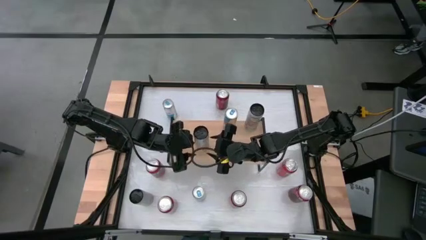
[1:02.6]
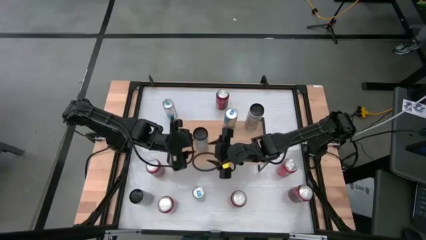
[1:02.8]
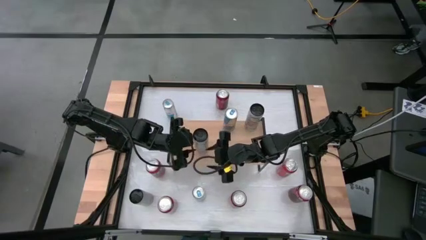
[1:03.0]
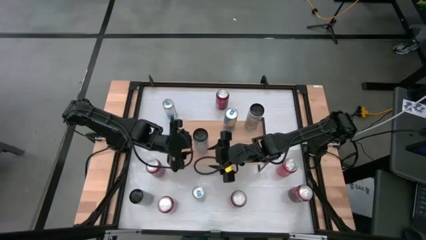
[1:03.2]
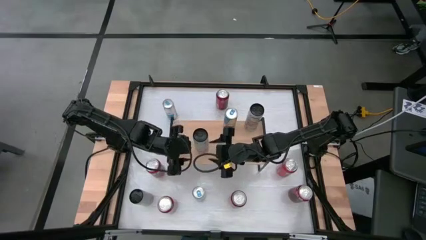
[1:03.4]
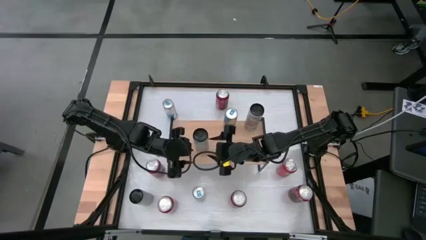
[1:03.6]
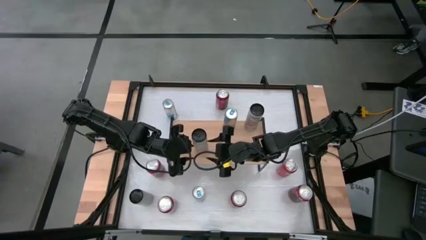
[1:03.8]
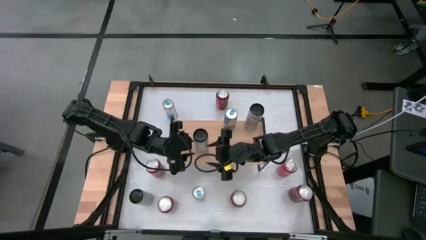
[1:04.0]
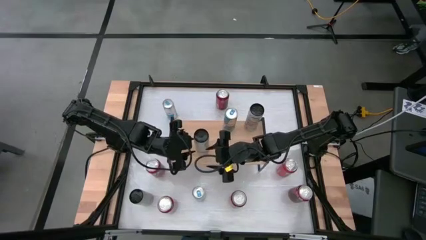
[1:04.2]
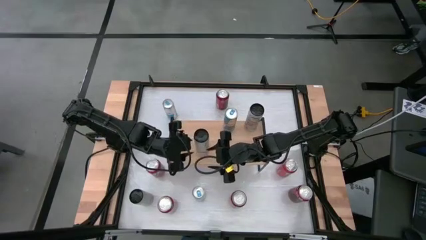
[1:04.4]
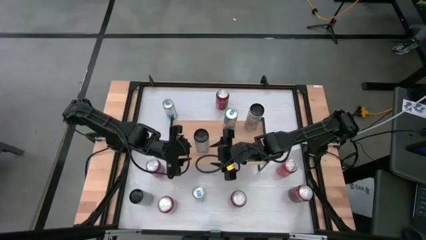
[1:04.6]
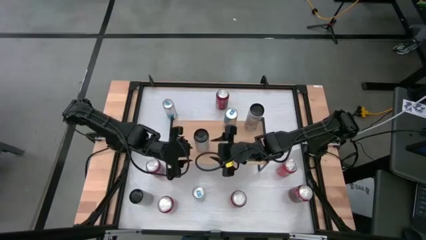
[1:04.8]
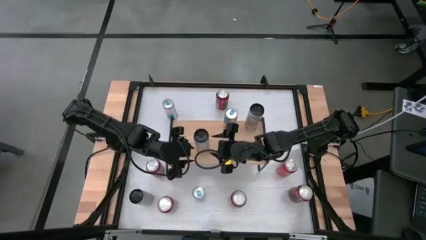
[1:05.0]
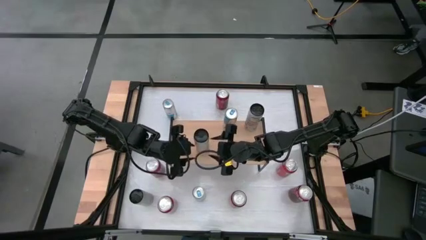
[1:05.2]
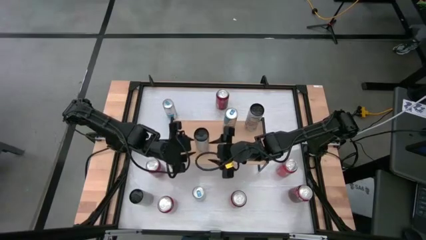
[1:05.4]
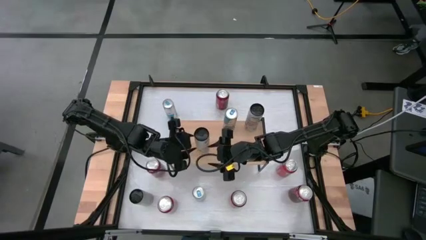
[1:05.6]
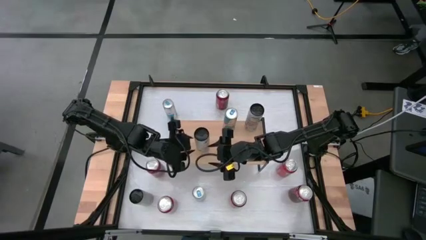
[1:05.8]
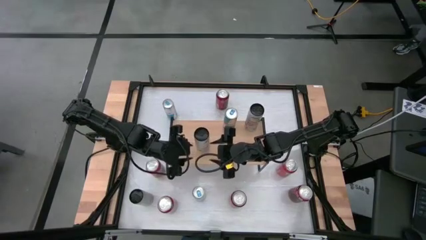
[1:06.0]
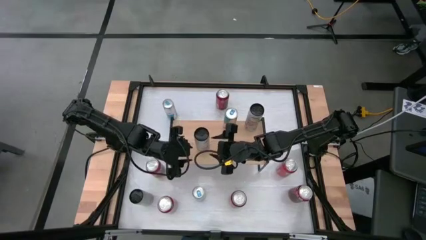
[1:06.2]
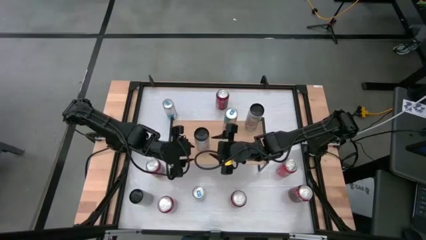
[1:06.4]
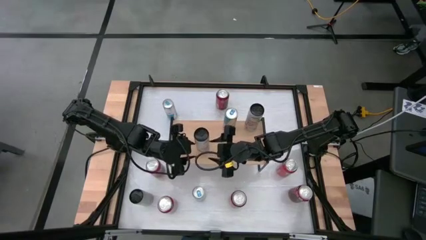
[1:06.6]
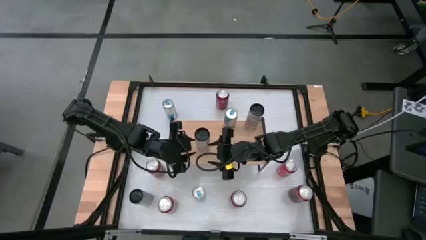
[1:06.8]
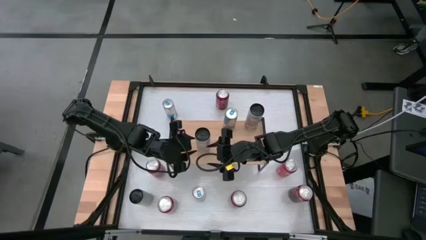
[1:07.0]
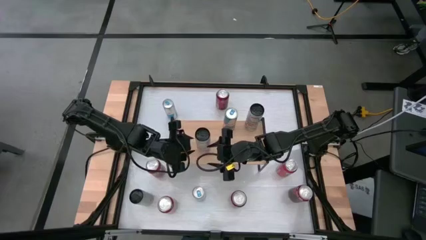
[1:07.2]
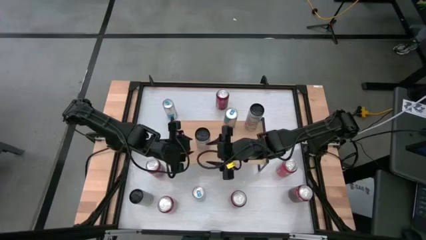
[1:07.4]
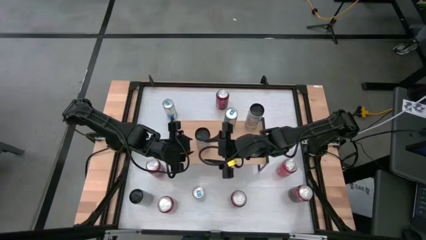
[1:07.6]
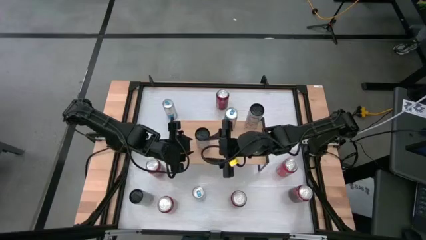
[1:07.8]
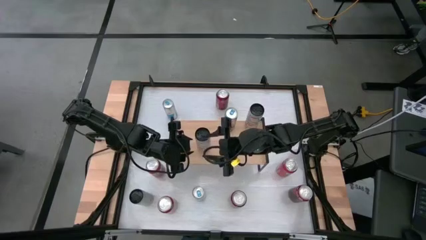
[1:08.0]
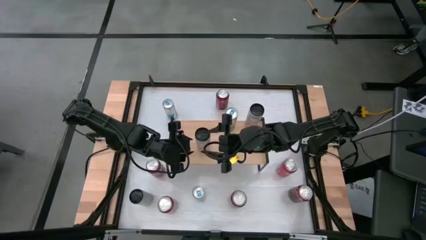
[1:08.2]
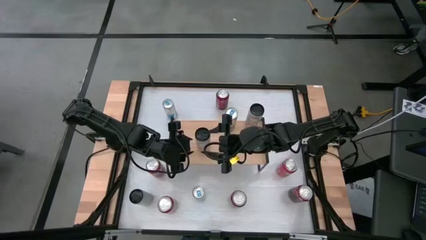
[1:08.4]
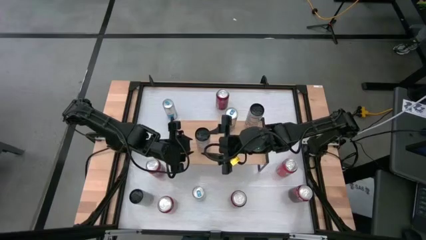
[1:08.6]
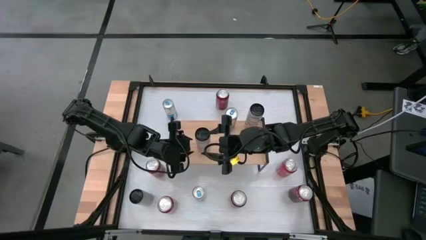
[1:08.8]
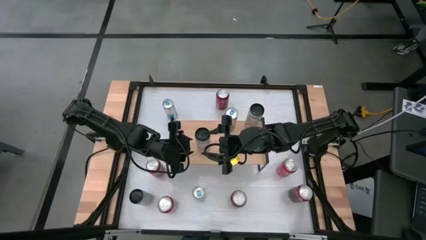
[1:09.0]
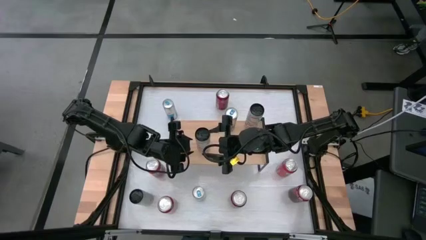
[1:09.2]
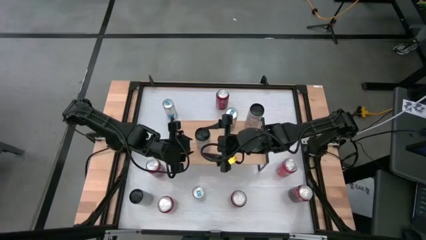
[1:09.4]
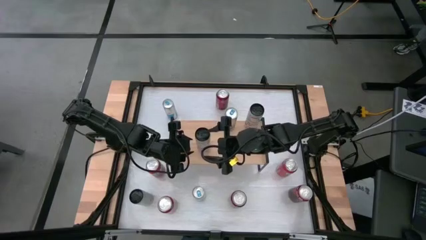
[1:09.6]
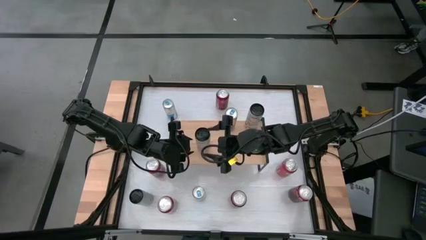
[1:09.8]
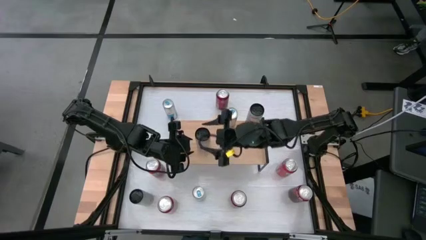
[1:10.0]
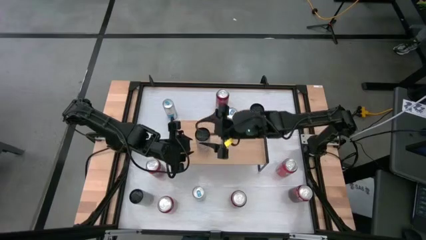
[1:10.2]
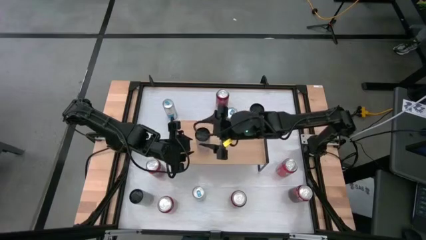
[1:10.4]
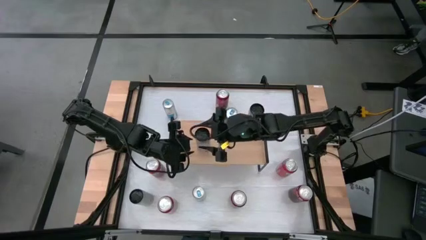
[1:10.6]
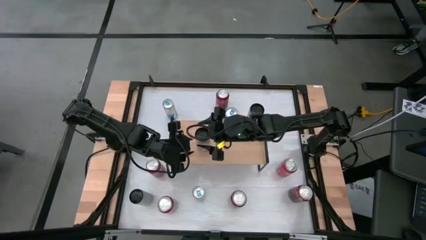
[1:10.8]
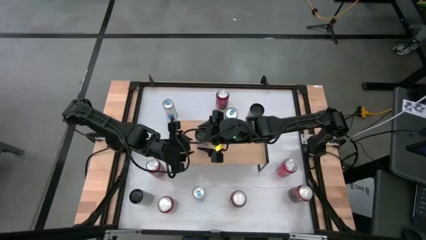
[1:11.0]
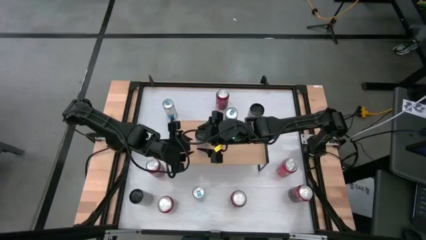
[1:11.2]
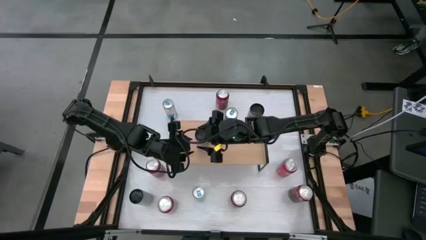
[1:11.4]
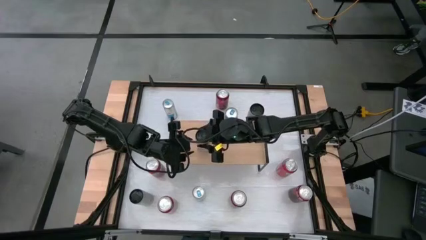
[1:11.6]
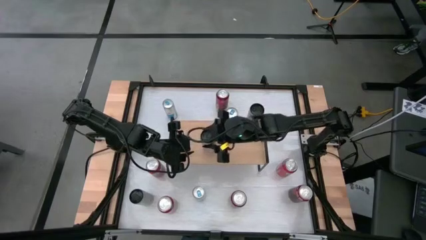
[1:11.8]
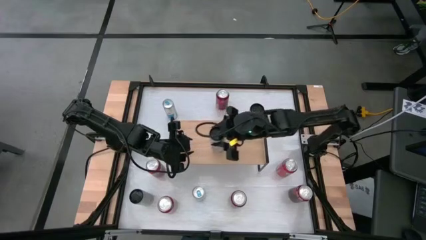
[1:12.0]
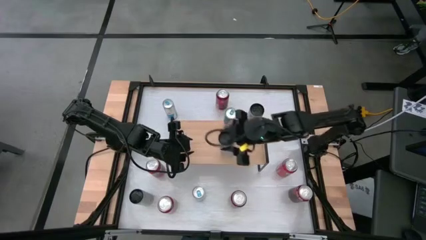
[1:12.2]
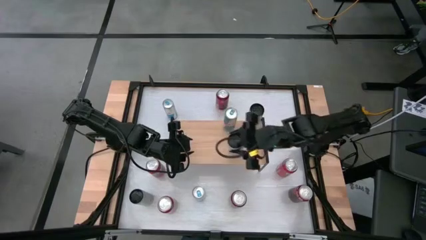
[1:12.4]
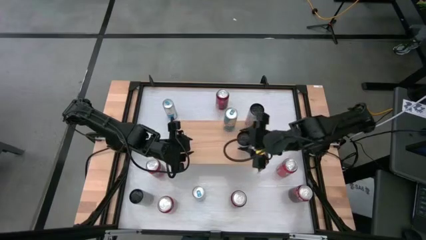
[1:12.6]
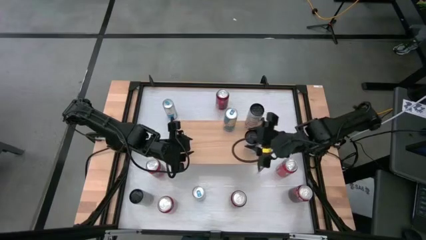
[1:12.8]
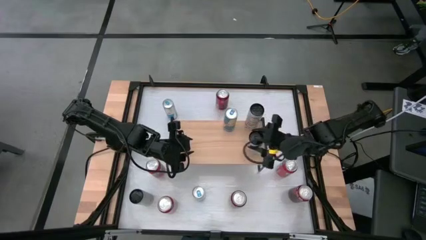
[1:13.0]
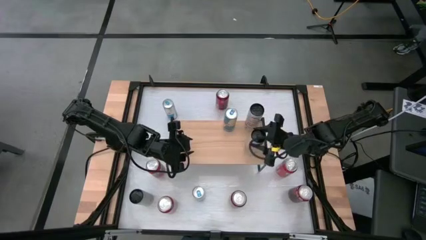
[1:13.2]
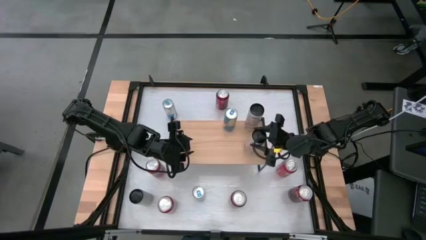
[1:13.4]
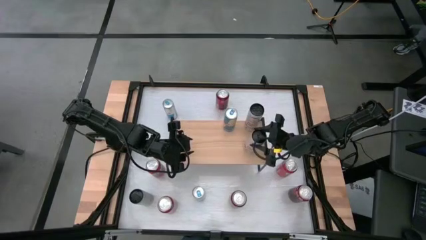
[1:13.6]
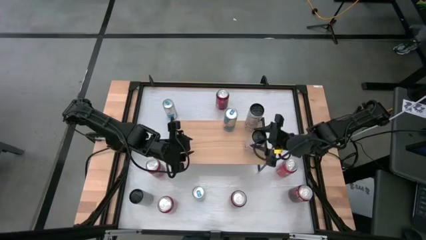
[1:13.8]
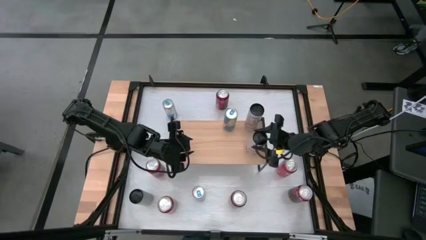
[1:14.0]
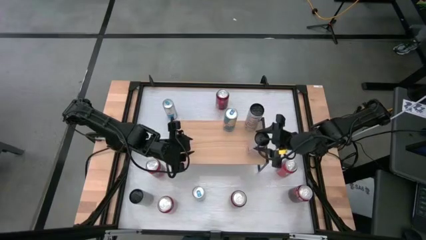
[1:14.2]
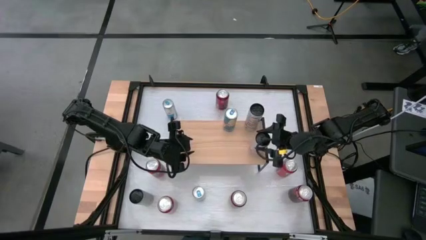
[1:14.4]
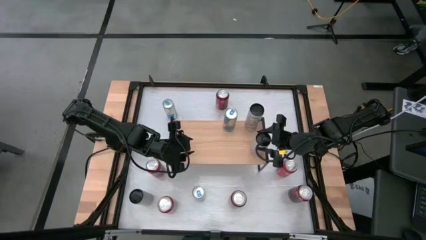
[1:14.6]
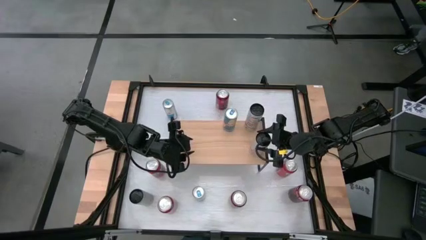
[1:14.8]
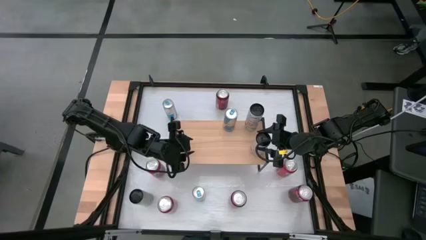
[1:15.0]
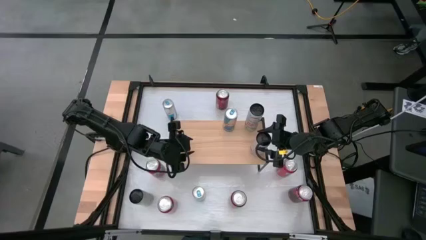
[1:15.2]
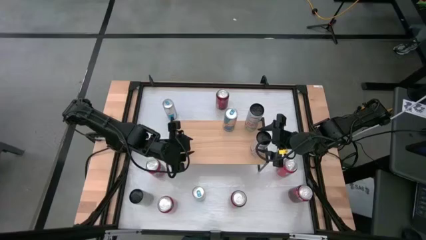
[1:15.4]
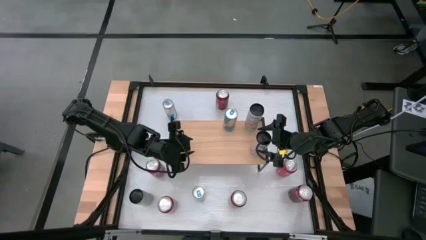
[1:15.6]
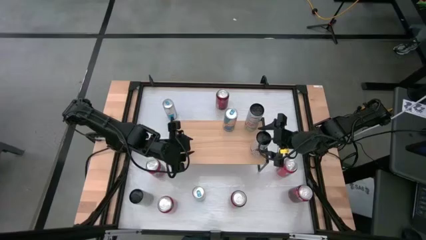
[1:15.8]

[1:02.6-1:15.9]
Task: Place canned beverage on shelf
Put the top white-pink soda can on the shelf aligned with the other white-pink soda can

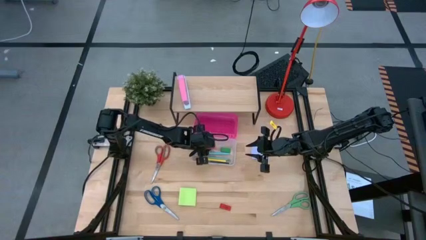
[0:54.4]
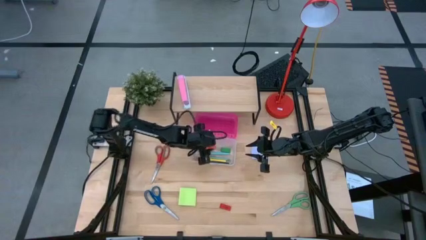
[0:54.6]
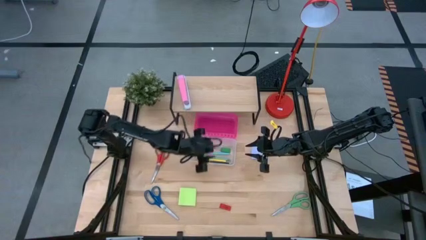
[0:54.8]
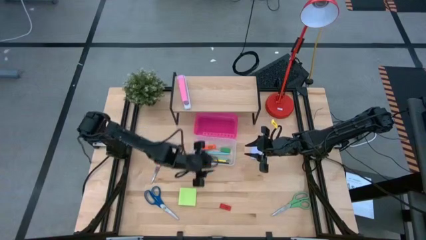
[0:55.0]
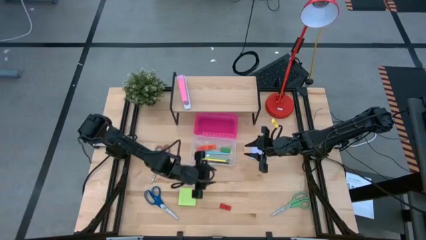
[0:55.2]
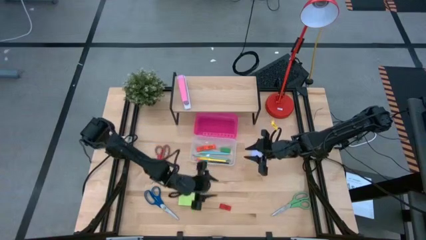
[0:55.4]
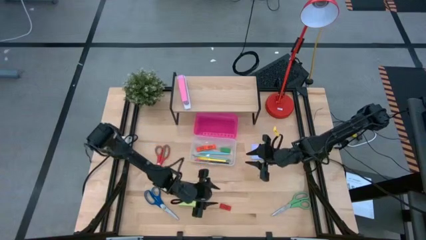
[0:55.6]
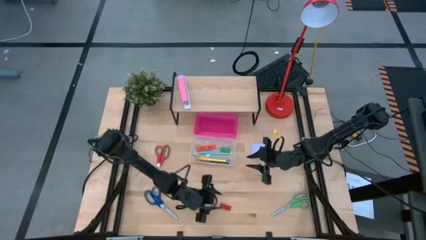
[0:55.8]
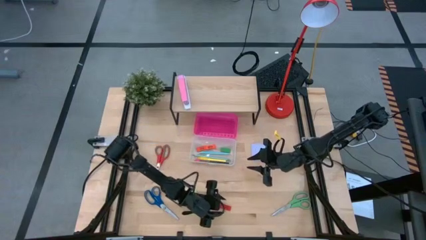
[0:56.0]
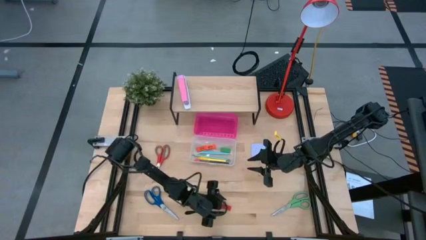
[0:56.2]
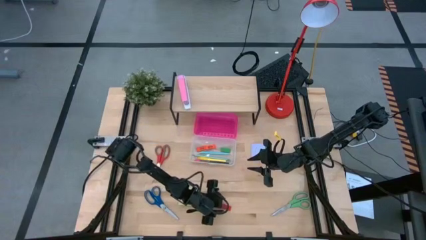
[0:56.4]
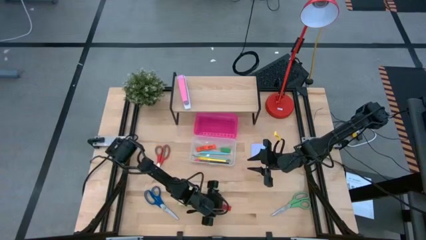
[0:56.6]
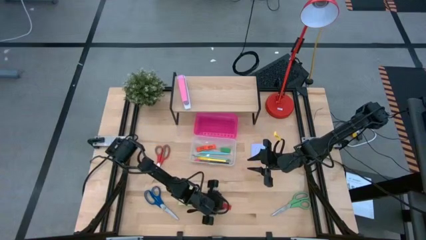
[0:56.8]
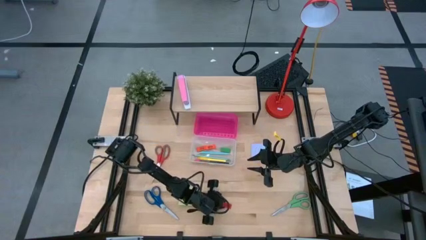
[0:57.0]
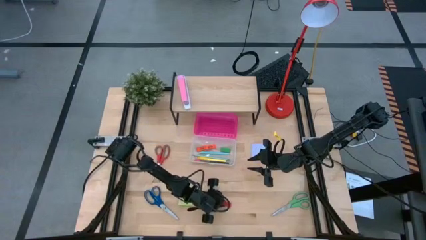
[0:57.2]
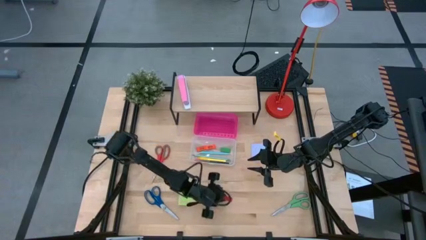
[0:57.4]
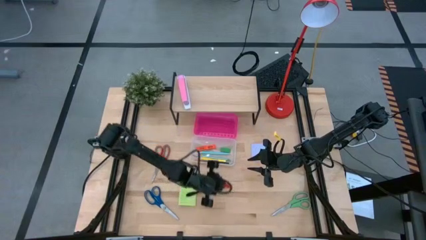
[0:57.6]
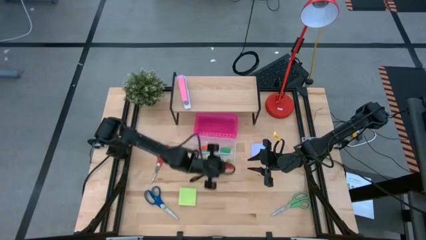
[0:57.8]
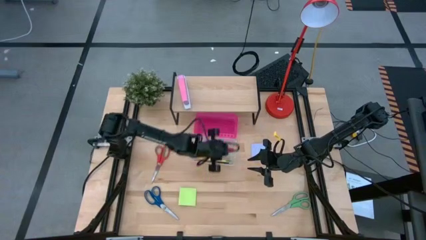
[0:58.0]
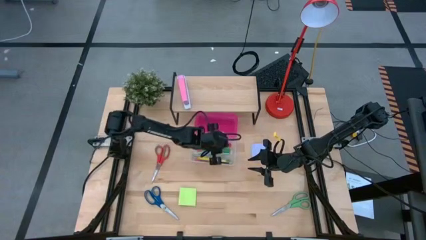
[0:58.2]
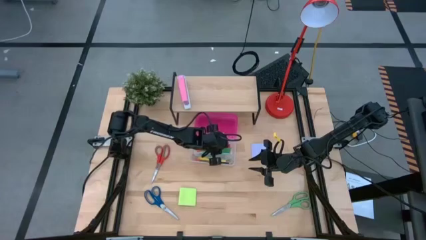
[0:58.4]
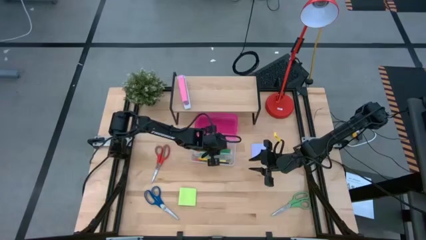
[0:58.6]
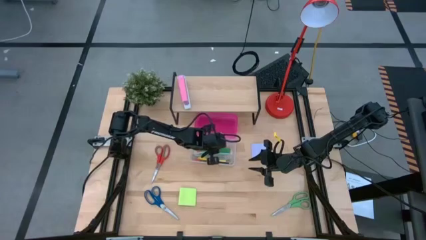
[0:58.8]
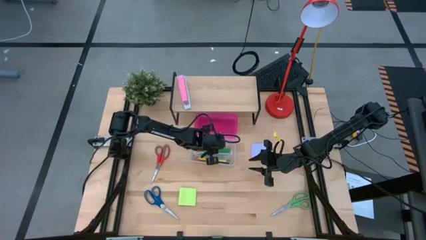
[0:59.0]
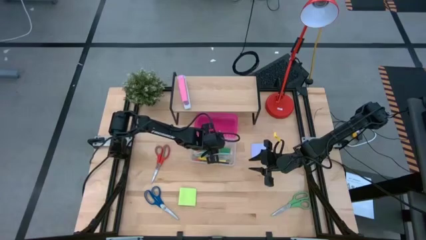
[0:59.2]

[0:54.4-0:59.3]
Task: Pack school essentials
Put the red eraser into the supply box
